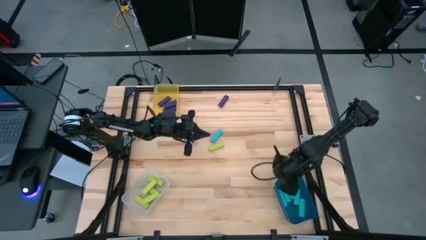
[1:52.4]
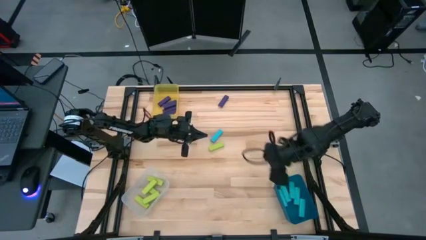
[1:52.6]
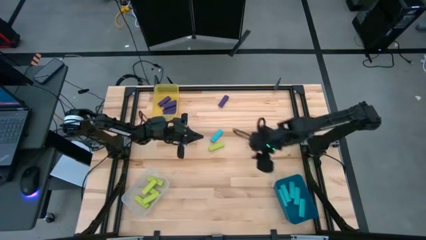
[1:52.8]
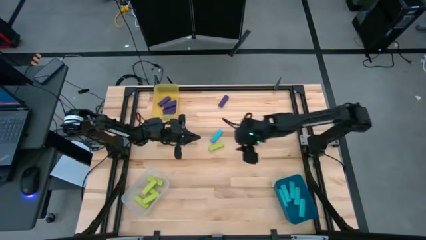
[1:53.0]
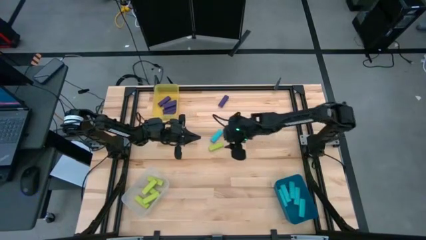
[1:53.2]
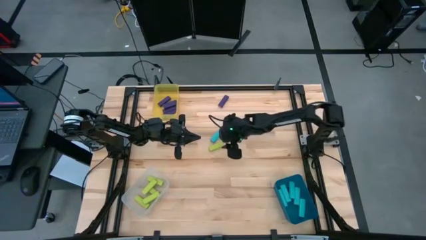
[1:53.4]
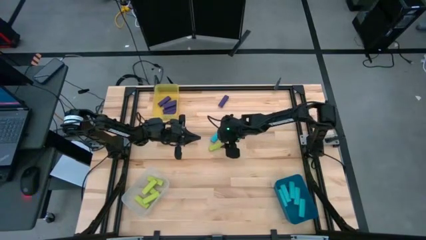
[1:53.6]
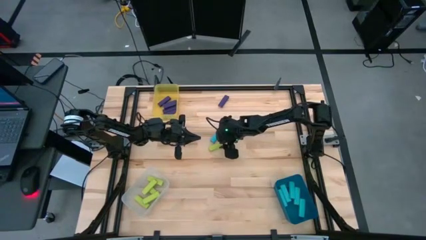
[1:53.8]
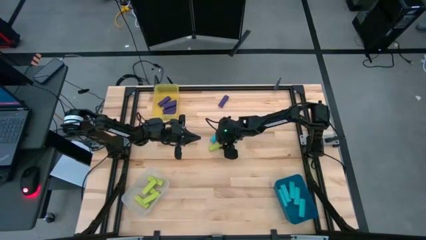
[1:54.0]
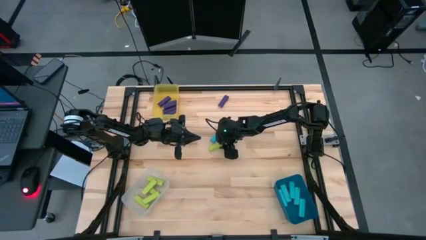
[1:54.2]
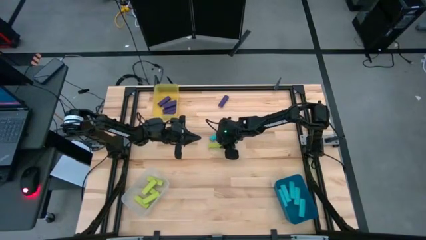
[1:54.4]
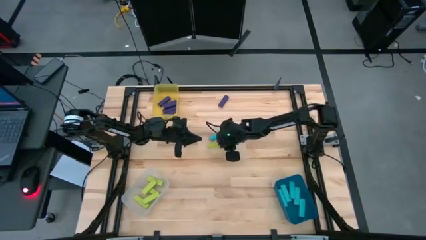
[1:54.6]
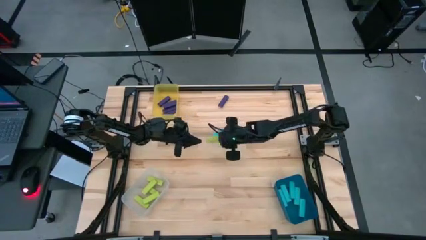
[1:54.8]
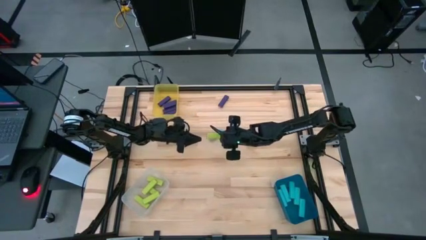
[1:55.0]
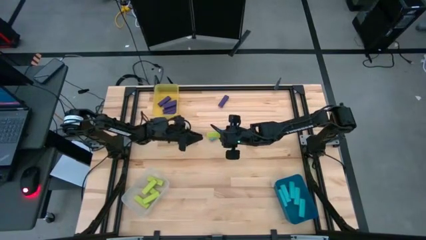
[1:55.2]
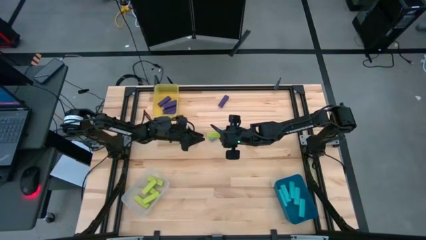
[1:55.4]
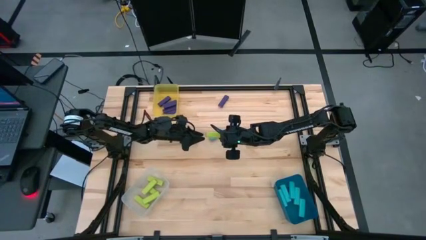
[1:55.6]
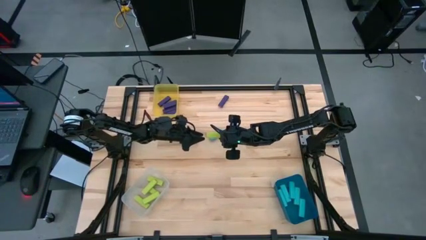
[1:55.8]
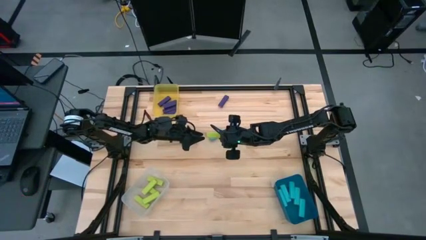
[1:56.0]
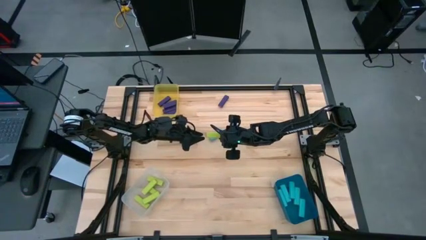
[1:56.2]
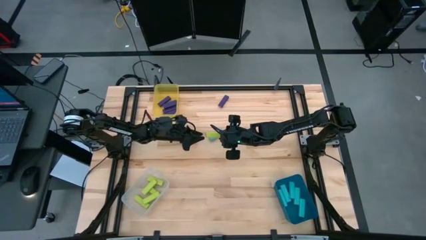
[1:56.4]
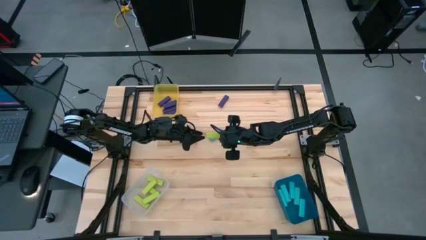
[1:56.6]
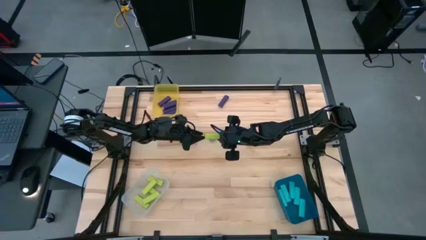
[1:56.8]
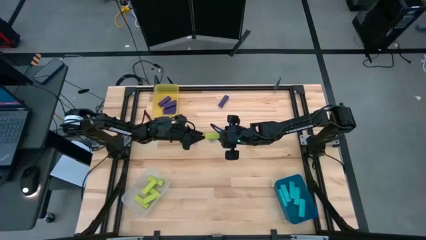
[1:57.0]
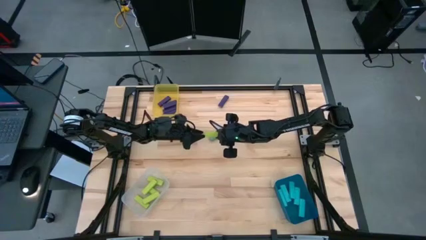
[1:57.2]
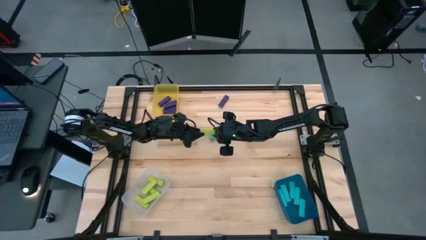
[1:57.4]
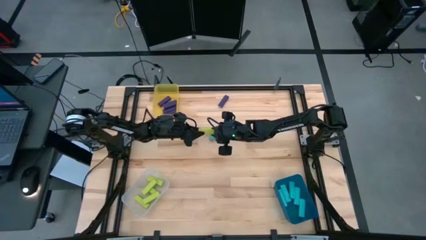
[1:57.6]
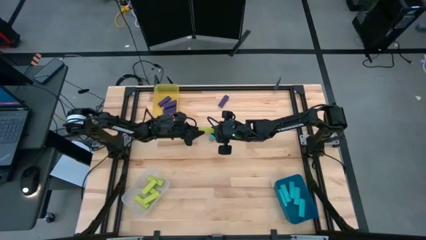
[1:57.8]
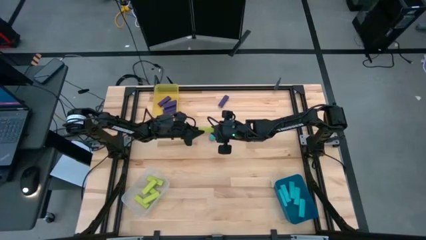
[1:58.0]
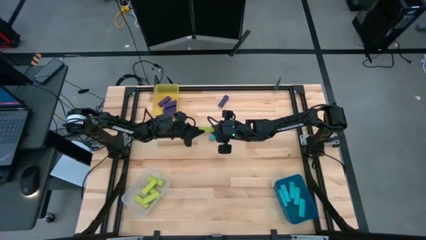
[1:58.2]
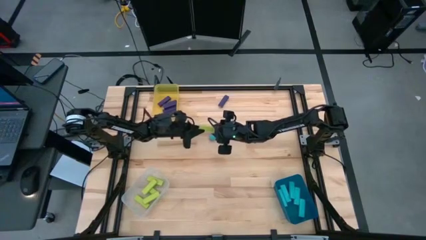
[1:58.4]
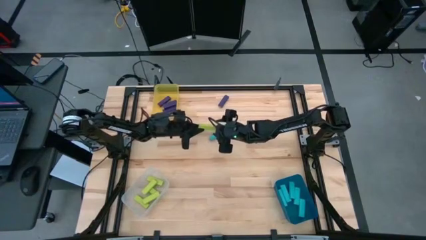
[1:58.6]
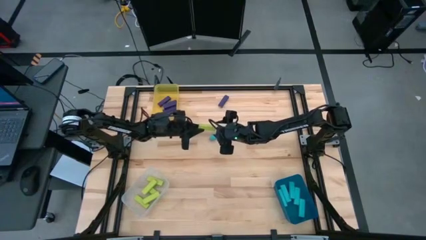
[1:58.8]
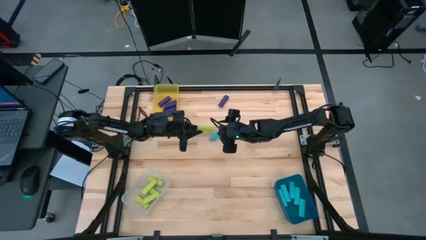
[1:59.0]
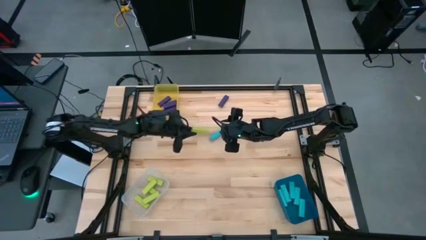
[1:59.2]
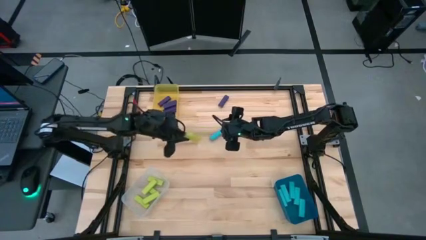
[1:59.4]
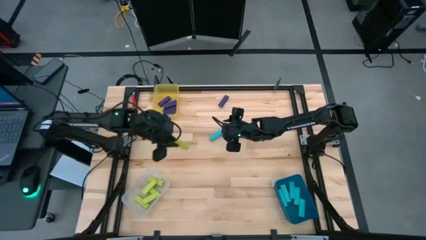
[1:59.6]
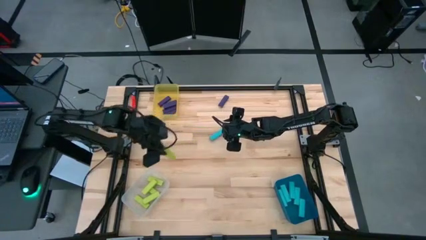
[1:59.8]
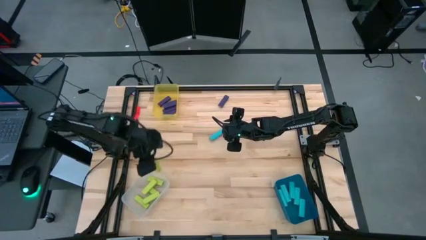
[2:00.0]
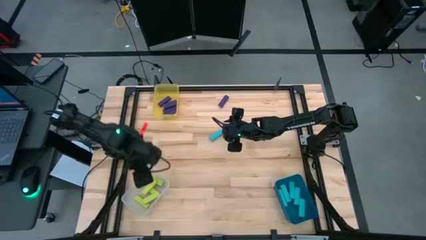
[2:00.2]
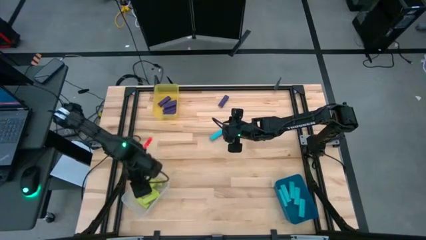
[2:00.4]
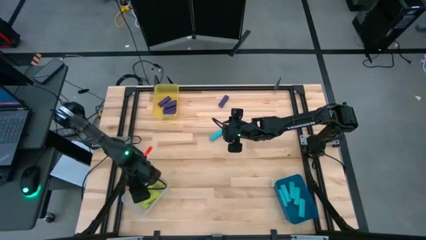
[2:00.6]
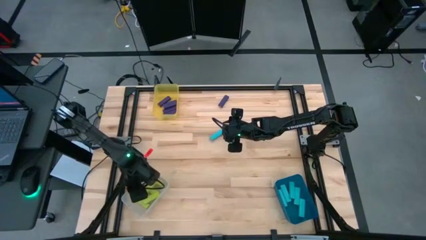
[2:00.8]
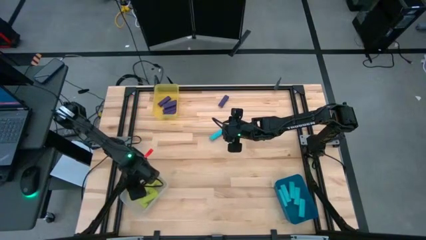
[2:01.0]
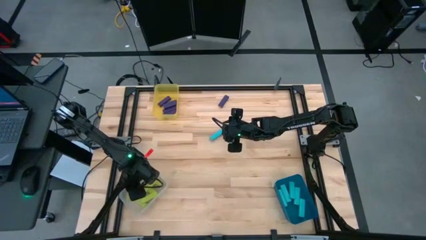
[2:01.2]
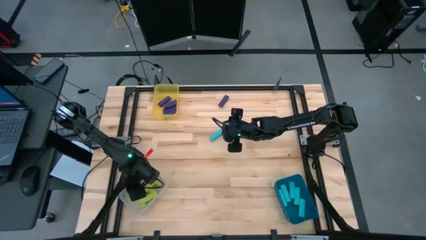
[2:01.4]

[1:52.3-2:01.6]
Task: Sort blocks
Put the green block into the transparent bin

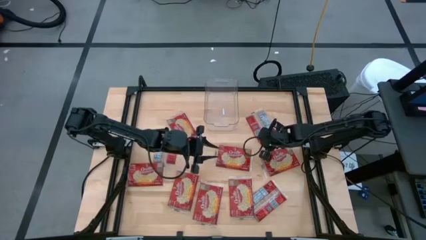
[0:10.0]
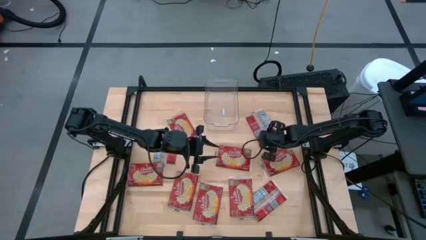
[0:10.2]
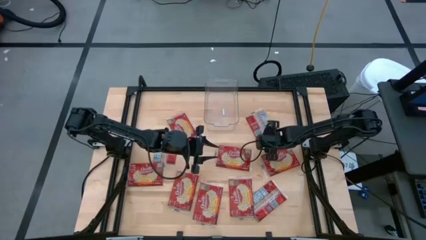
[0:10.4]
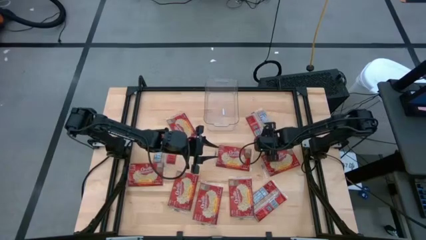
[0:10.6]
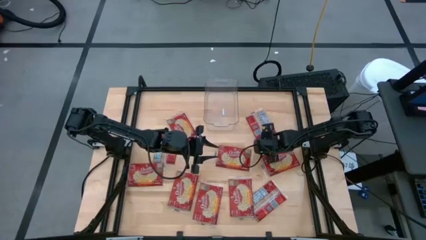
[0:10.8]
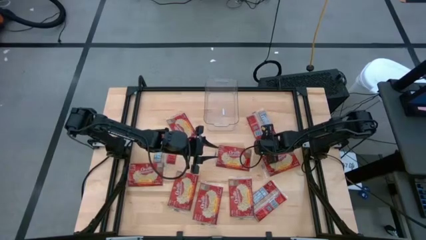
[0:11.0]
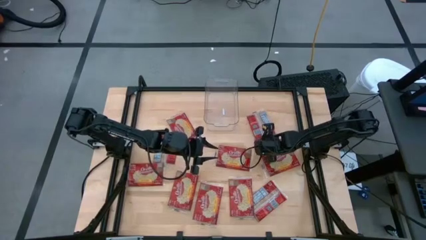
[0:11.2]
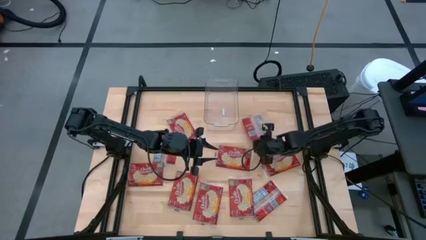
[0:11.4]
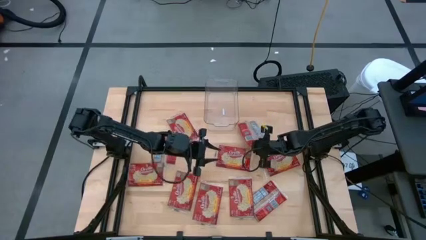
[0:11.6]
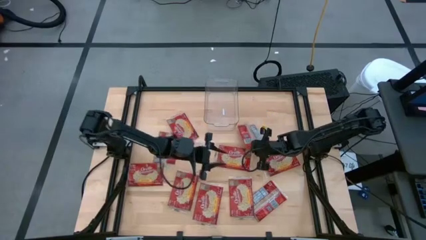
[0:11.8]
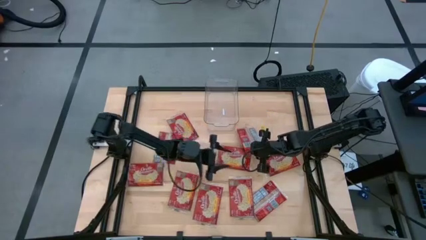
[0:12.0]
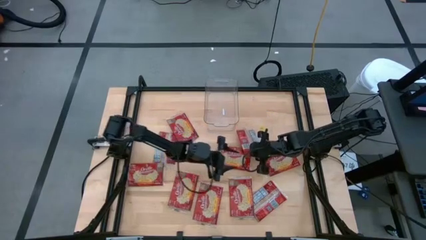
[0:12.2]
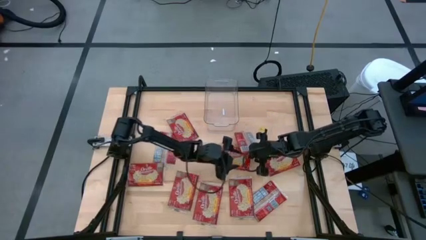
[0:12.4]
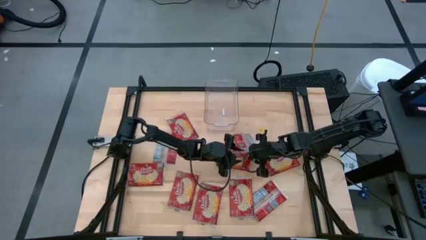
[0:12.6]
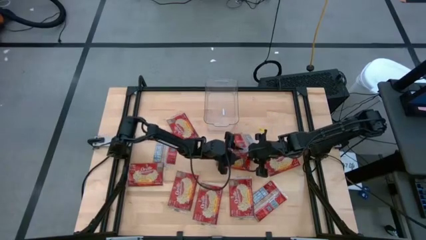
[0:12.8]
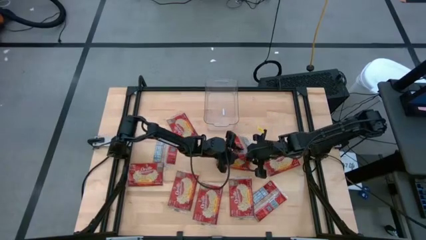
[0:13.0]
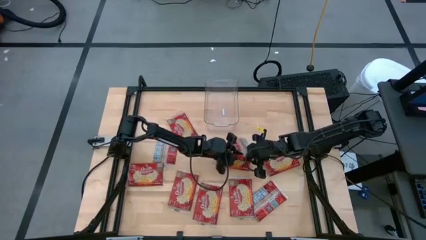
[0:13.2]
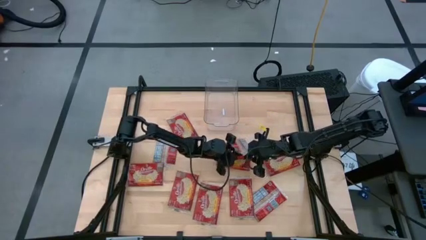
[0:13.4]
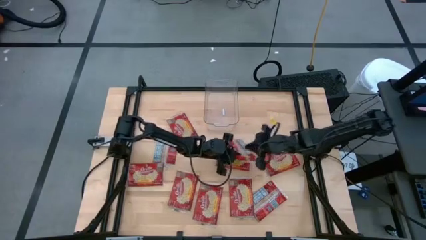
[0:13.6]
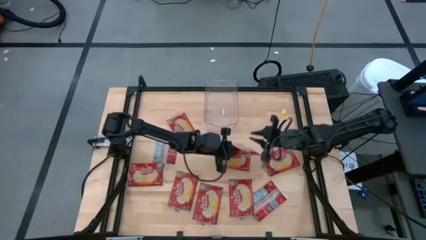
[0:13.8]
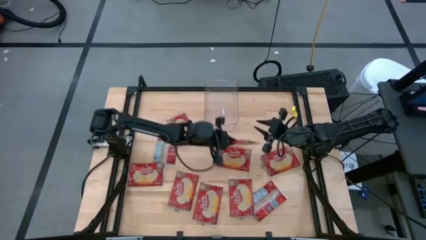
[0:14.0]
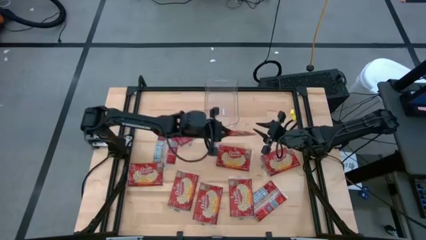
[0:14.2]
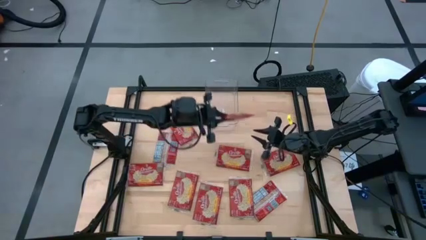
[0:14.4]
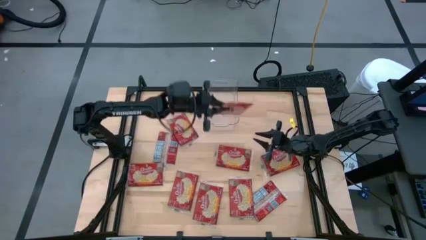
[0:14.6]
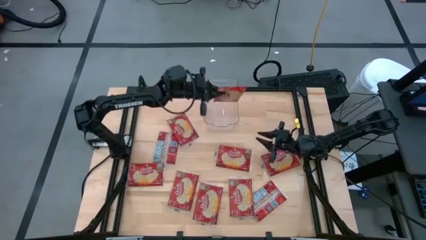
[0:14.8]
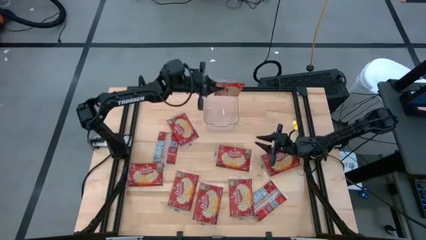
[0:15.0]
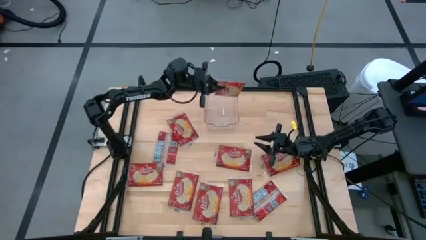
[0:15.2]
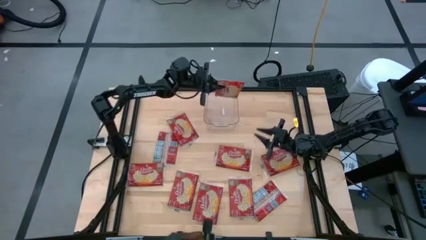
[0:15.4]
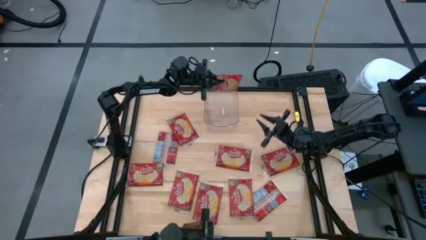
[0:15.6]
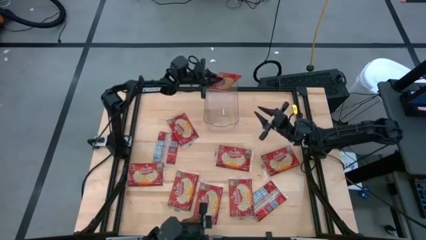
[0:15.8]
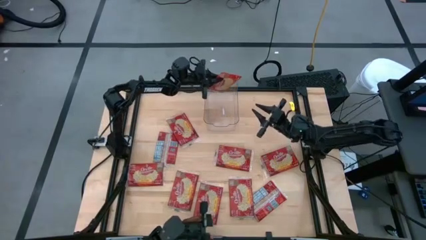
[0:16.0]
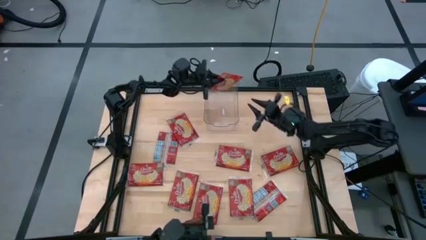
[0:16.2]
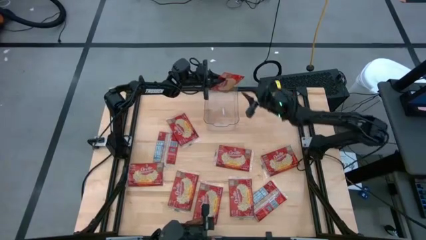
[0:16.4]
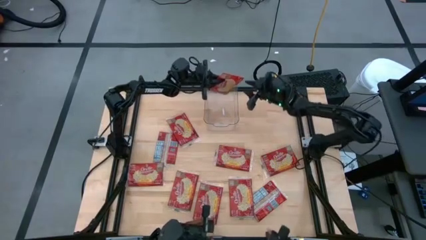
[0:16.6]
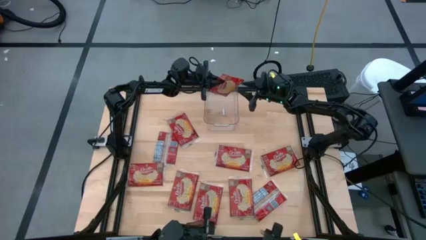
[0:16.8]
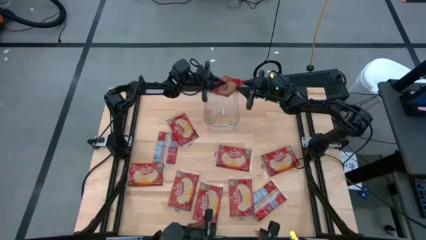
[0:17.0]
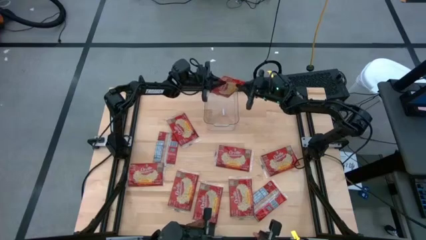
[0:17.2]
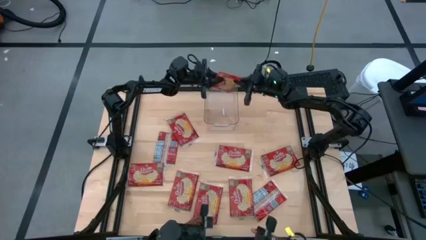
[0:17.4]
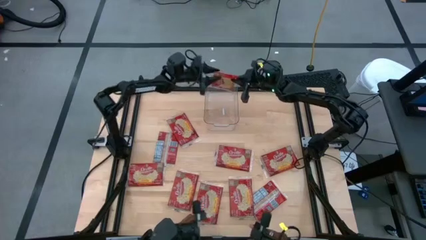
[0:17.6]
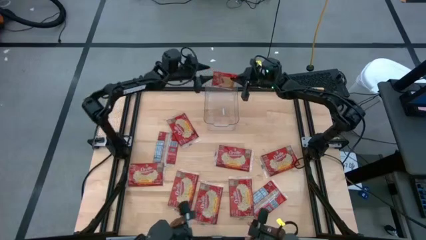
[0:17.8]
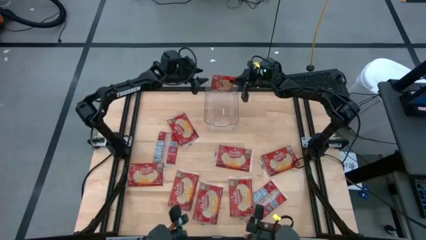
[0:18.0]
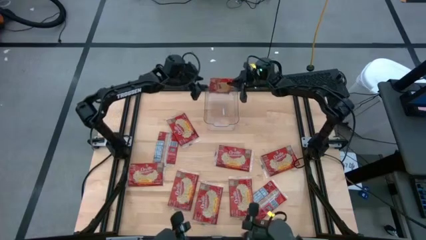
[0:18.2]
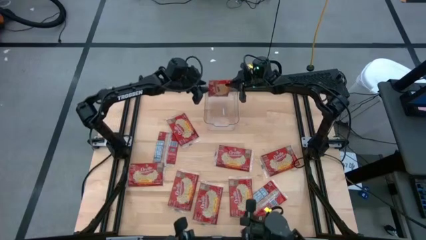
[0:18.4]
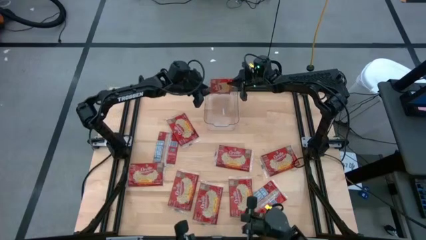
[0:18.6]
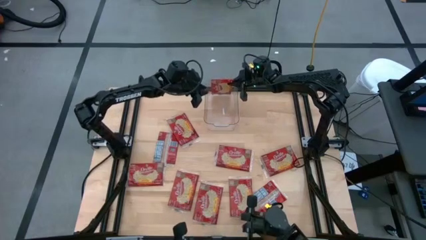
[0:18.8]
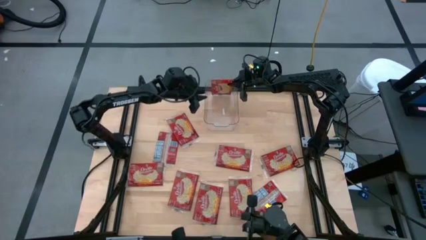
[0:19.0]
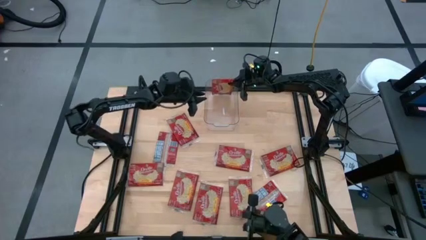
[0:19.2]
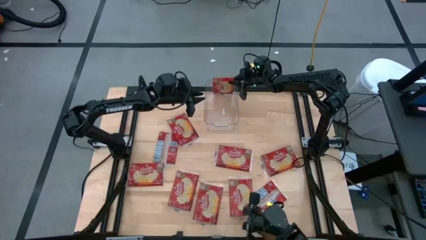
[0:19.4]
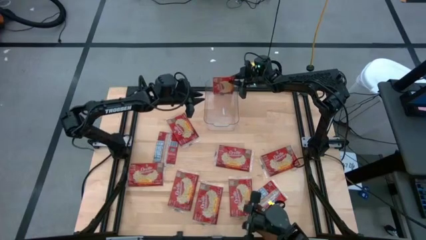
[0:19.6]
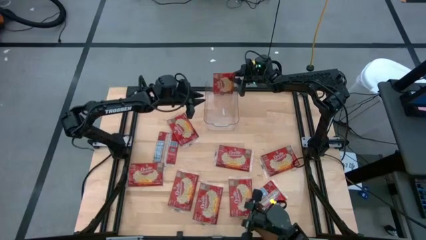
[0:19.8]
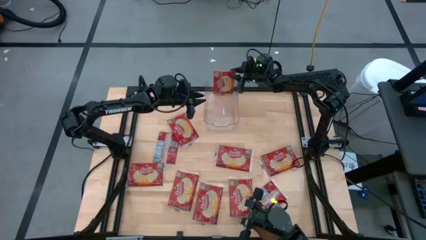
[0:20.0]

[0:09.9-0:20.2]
Task: Sort popcorn bags into baskets
Put the red popcorn pack into the transparent bin
